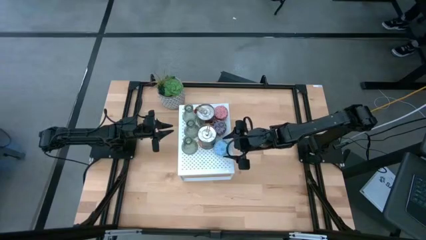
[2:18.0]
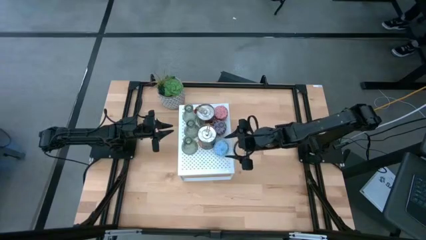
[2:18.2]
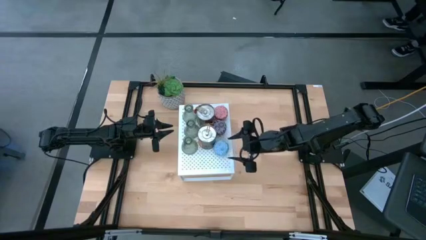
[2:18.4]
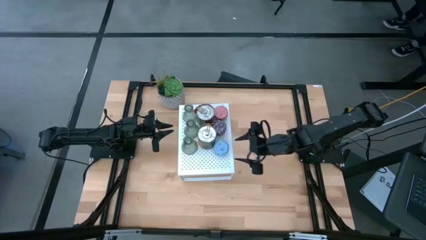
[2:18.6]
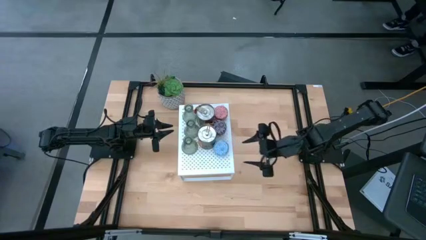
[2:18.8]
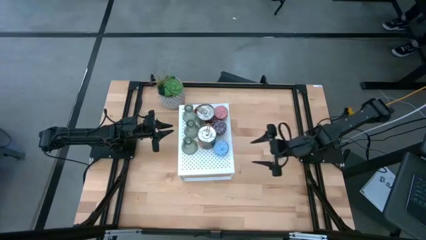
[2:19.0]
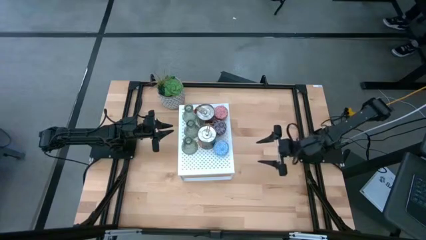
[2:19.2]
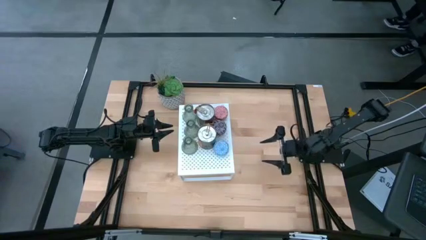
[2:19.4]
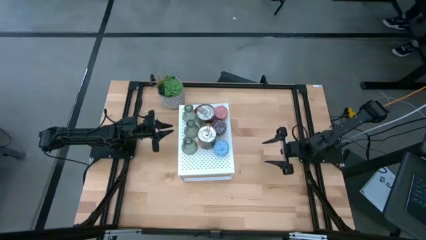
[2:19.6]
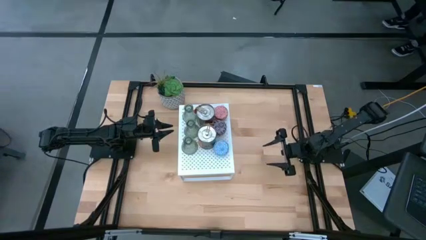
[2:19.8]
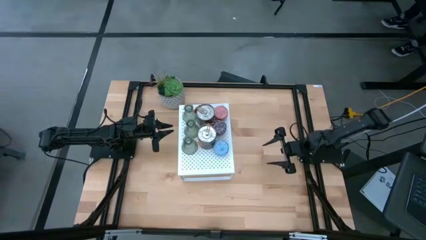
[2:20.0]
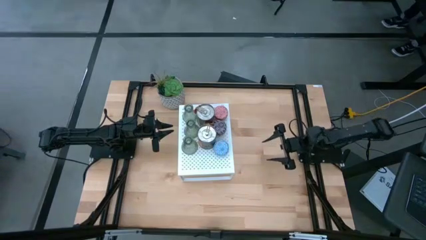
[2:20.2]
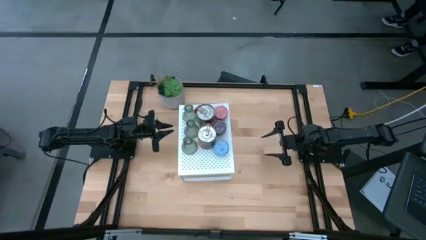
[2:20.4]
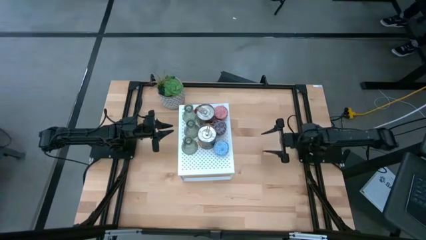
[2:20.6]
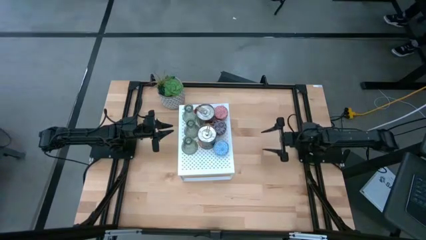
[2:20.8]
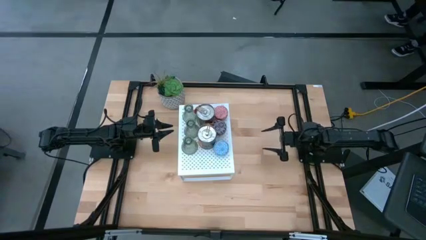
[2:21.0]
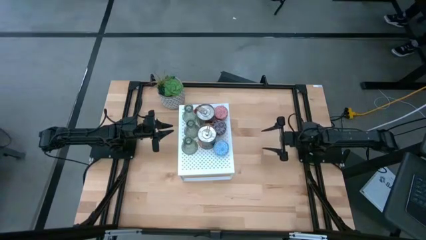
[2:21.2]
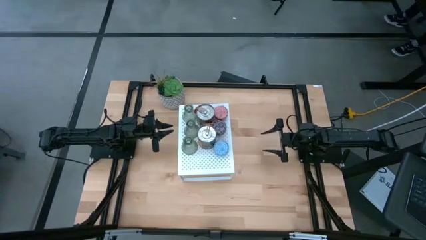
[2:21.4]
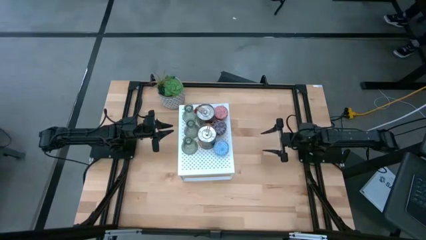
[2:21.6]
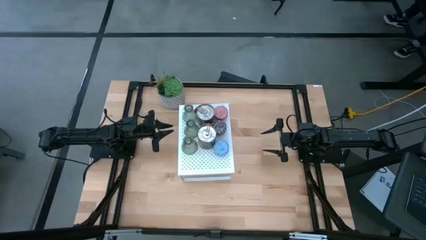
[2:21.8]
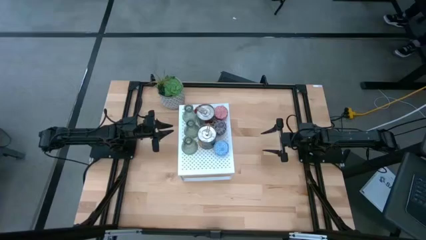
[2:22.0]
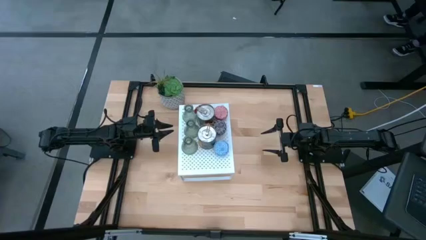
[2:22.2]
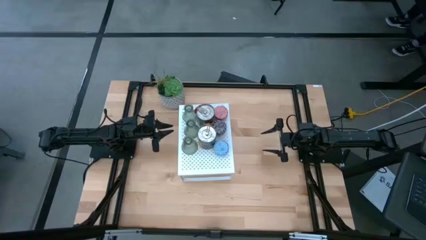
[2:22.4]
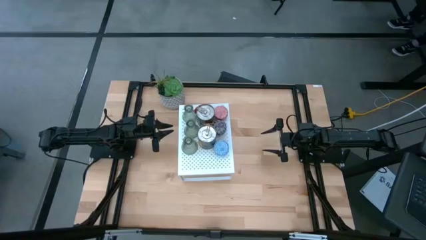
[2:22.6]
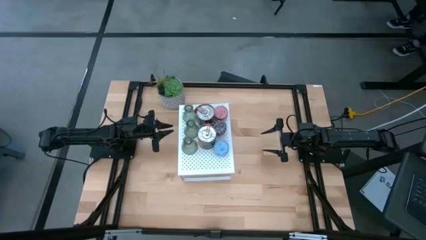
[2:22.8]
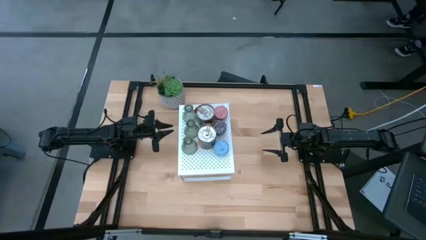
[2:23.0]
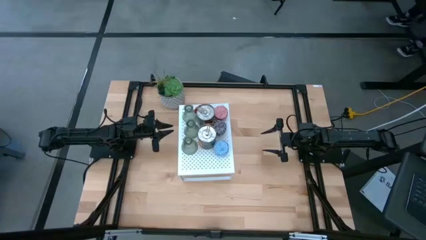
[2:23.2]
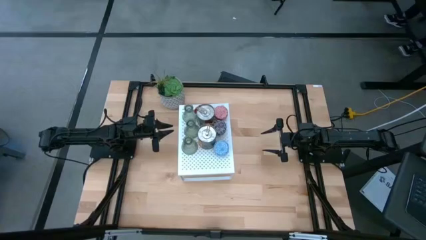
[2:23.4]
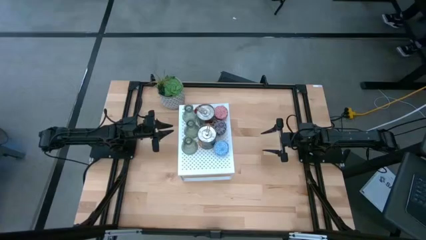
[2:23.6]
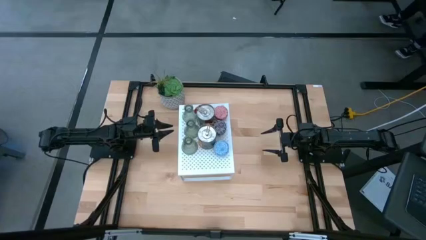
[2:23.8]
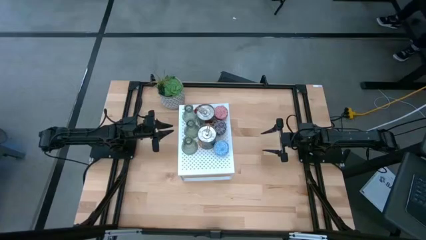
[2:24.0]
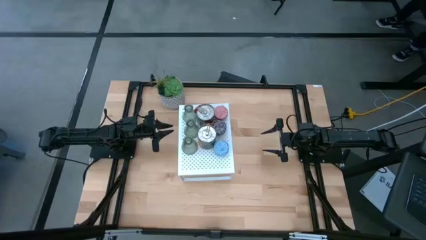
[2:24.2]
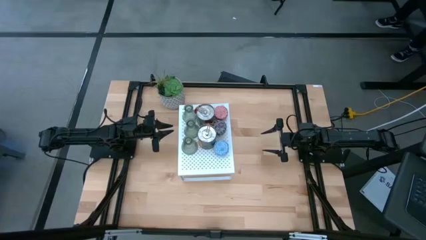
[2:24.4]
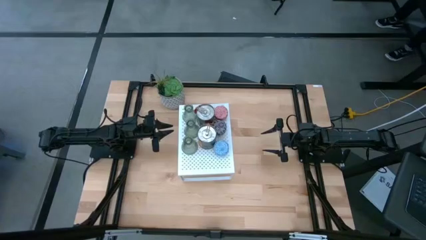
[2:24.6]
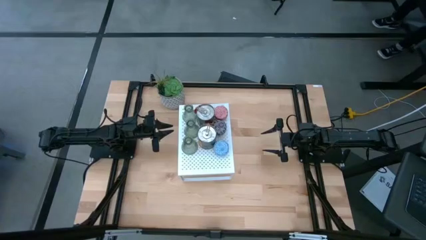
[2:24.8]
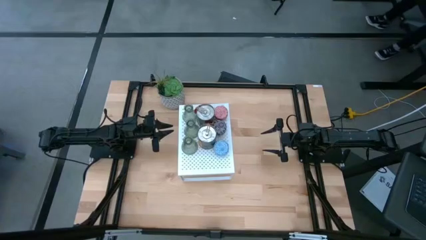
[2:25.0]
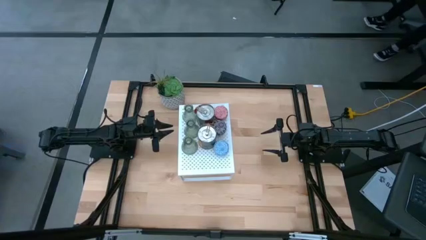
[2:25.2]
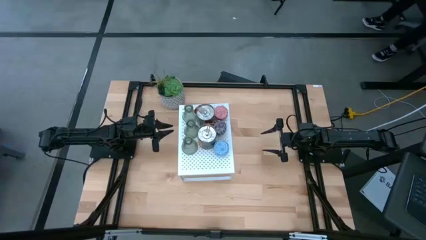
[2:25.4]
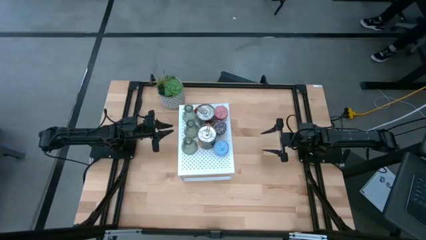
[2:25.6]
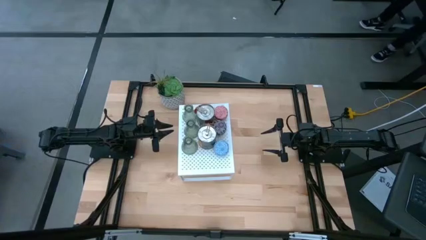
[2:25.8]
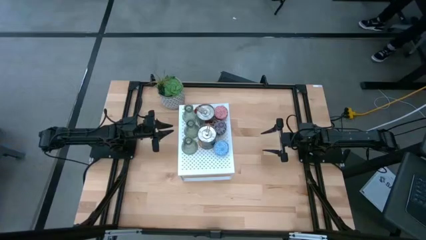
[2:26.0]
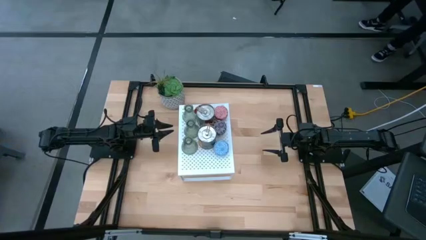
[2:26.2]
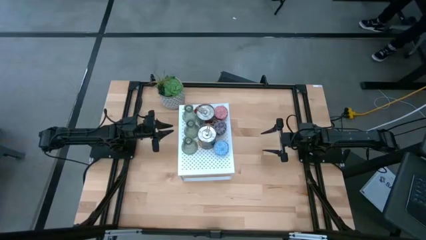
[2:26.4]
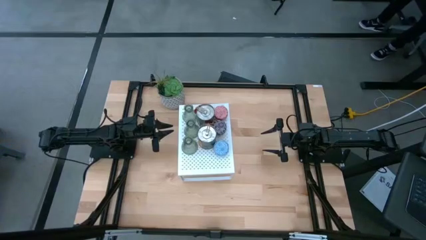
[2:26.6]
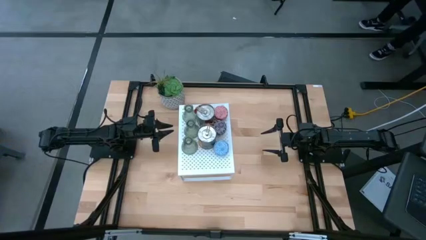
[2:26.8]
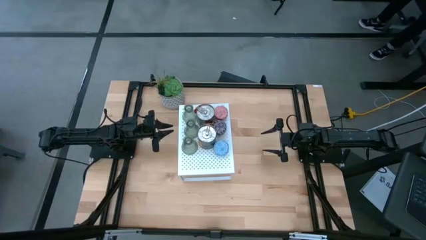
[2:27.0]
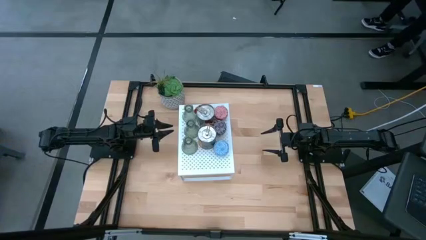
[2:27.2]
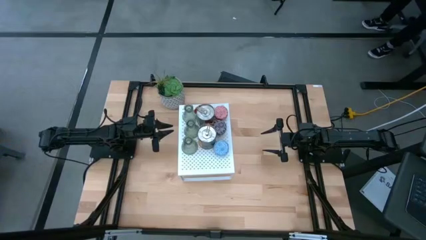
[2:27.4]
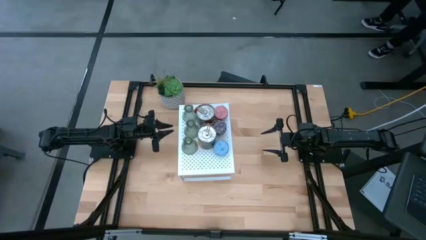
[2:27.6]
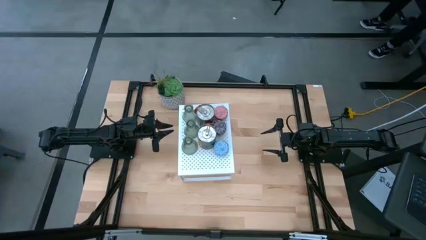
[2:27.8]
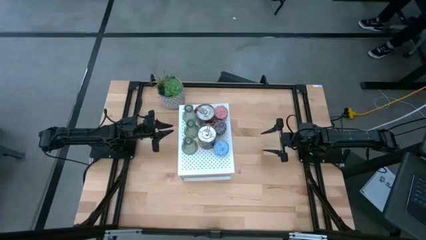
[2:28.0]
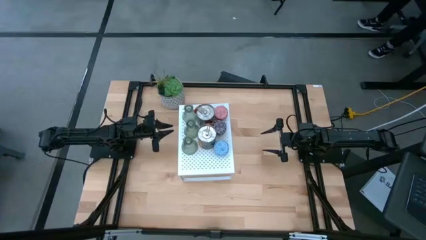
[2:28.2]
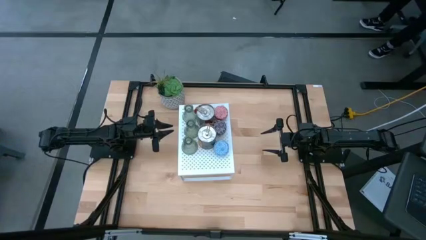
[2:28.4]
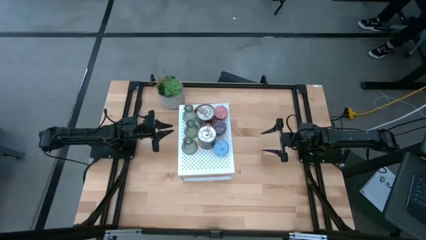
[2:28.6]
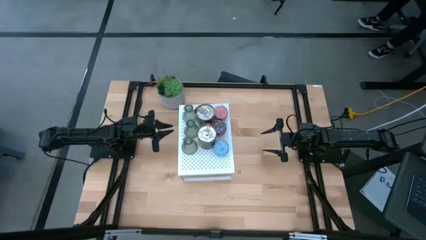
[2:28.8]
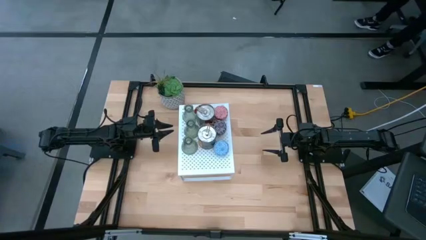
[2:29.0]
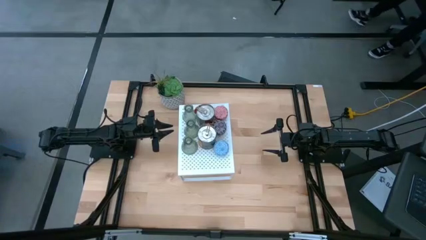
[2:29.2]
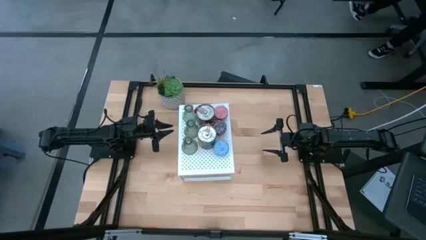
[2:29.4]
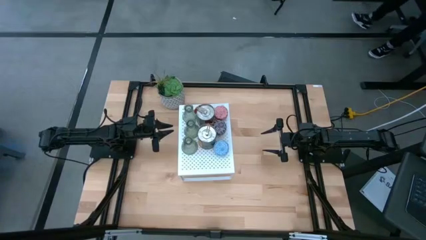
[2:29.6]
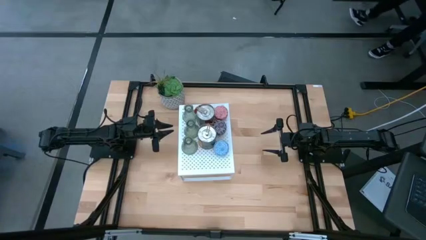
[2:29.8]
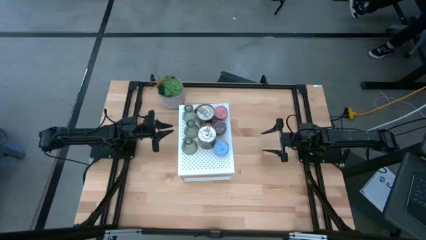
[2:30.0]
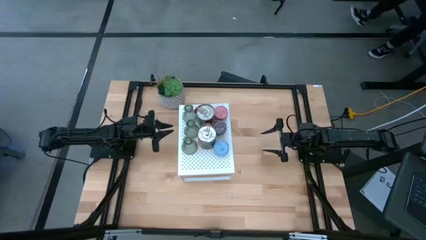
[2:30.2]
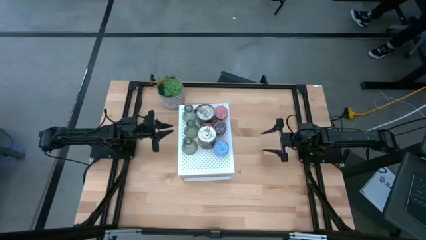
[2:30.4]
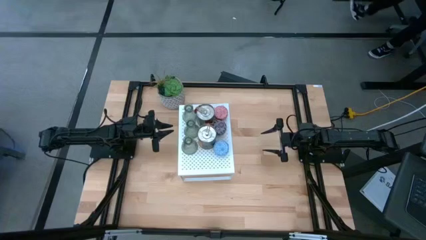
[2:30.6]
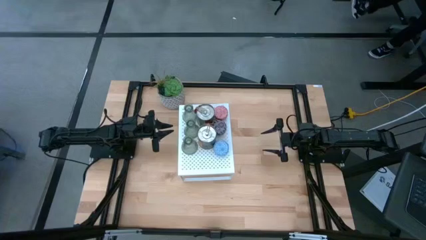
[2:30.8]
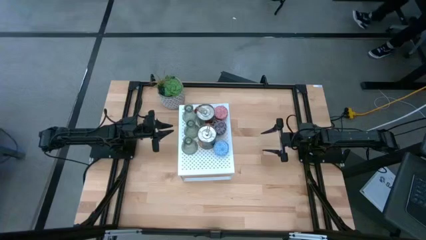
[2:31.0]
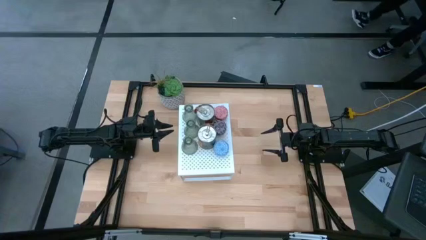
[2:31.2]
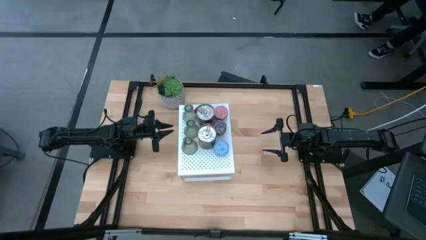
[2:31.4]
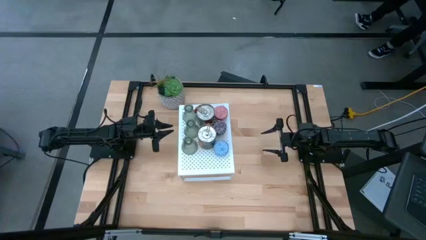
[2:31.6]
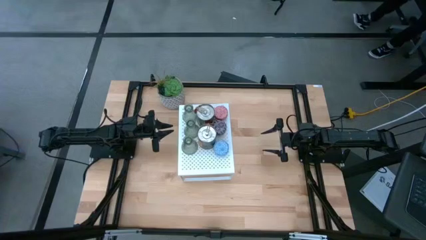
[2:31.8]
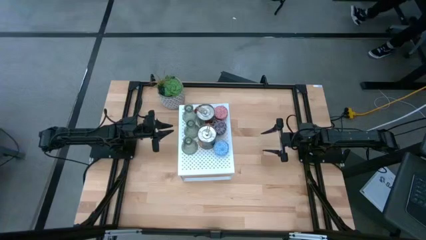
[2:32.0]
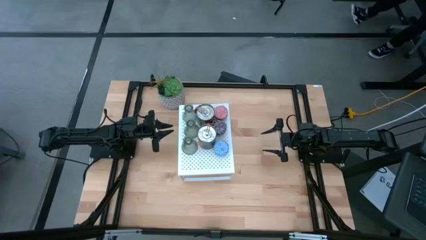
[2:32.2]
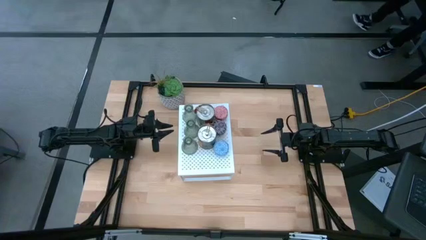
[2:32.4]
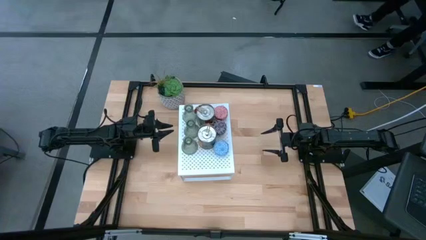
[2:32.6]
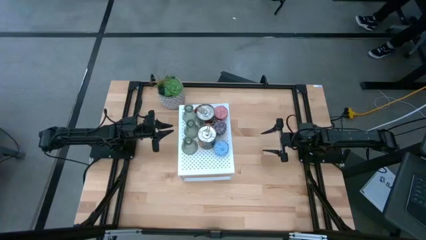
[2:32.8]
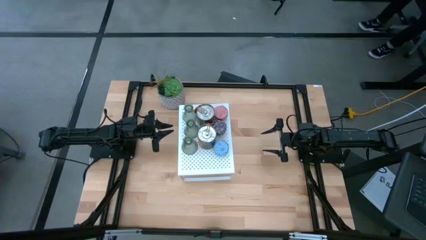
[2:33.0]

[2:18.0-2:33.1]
Task: Pick & Place candle stick holders
Return to Home Position

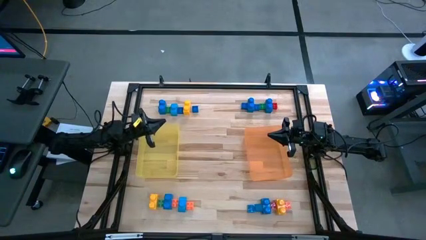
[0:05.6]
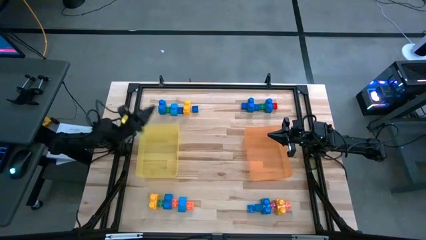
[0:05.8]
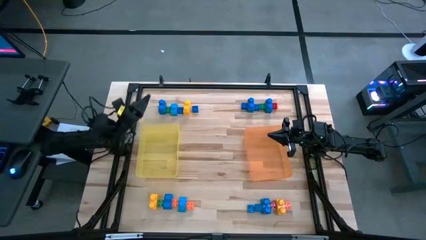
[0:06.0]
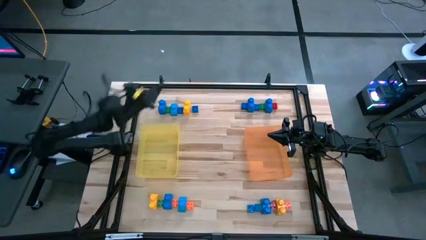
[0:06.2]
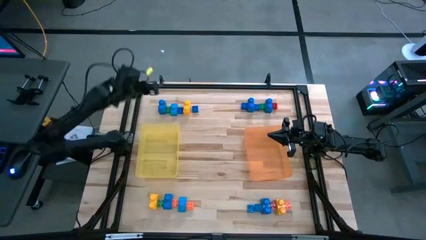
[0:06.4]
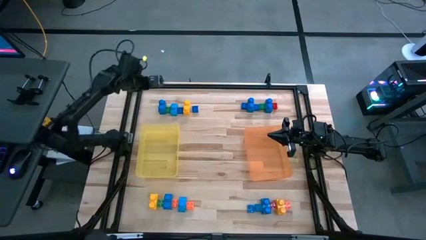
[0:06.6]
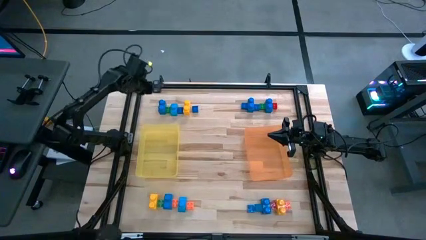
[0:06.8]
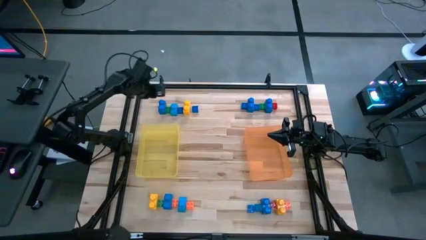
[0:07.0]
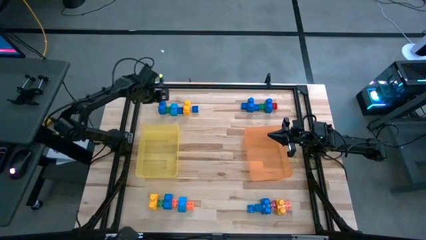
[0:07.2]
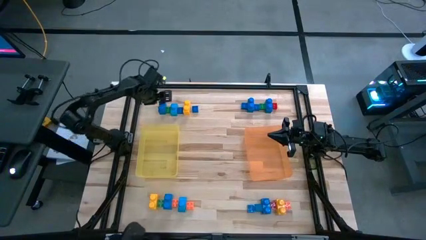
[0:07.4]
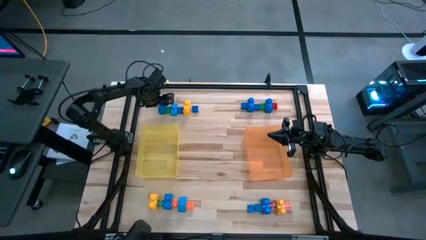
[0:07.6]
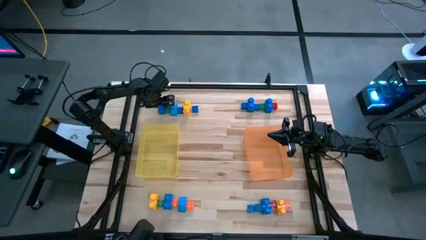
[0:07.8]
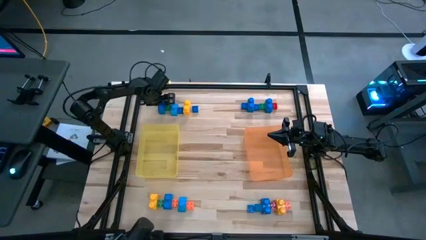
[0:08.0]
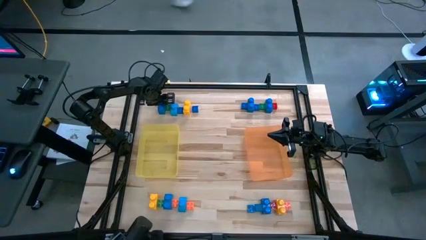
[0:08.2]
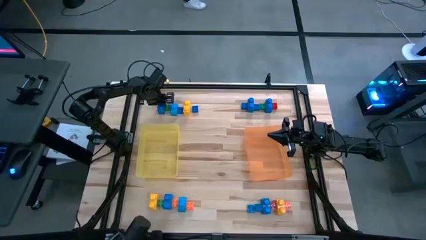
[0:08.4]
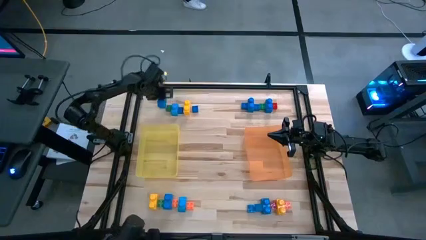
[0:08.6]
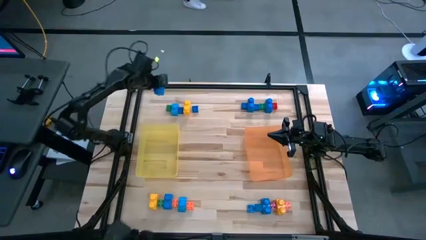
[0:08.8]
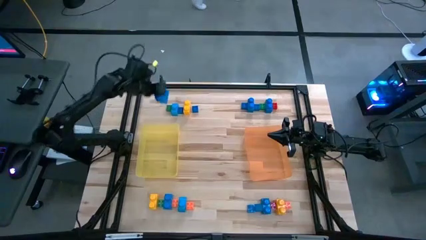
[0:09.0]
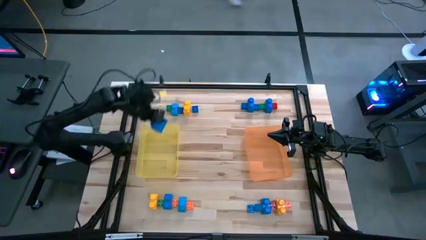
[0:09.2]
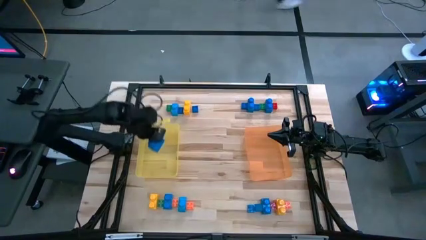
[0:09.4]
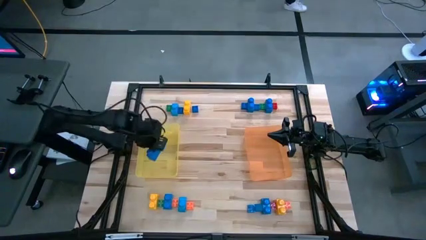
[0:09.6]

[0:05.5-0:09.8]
Task: Sort blocks by size
Put the large blue game piece into the yellow bin
